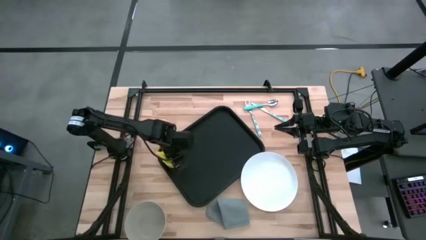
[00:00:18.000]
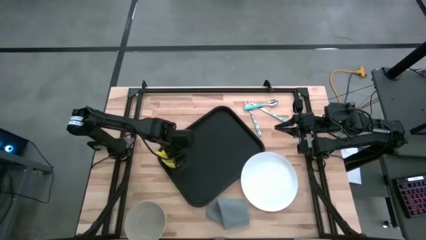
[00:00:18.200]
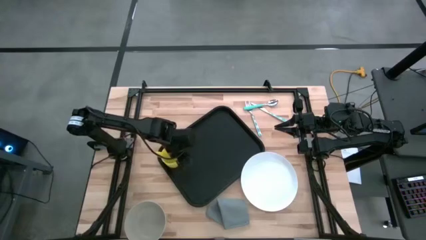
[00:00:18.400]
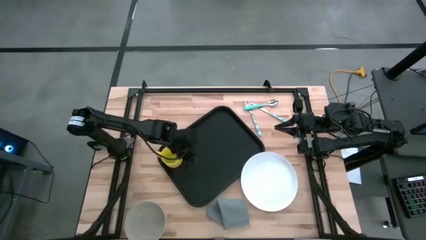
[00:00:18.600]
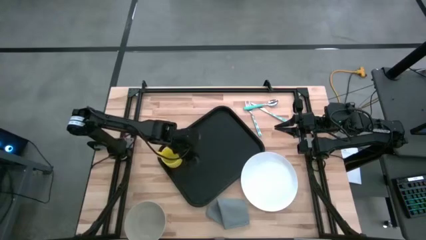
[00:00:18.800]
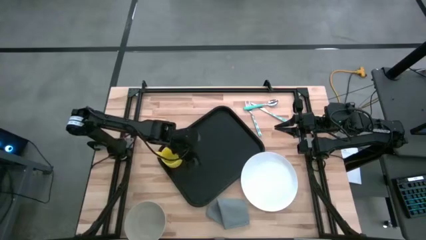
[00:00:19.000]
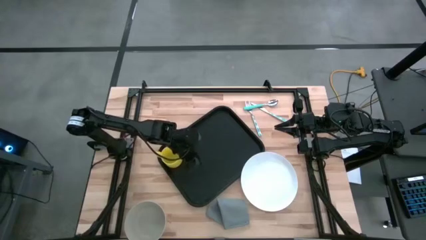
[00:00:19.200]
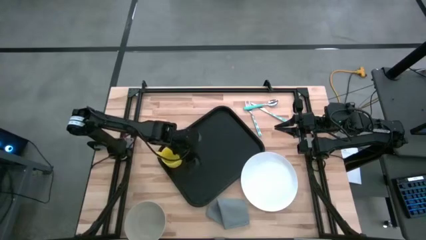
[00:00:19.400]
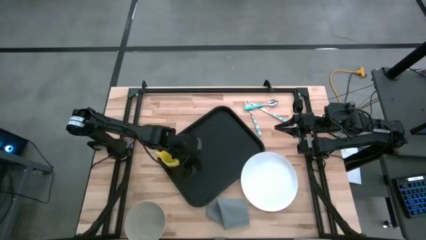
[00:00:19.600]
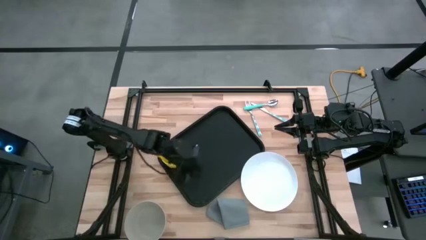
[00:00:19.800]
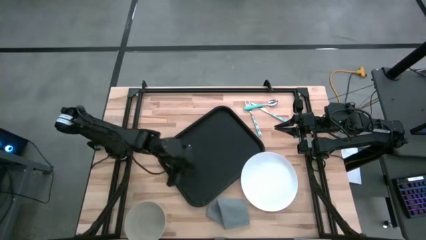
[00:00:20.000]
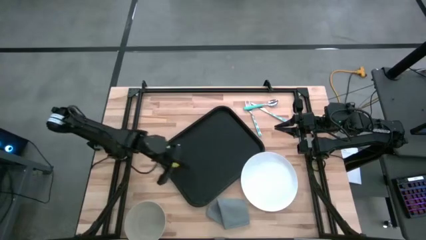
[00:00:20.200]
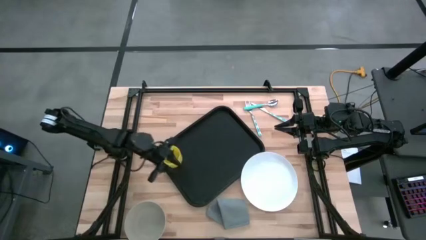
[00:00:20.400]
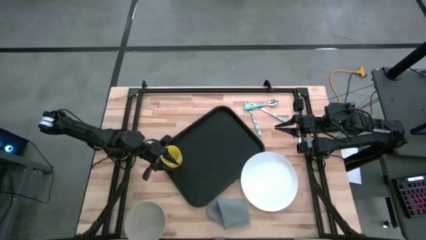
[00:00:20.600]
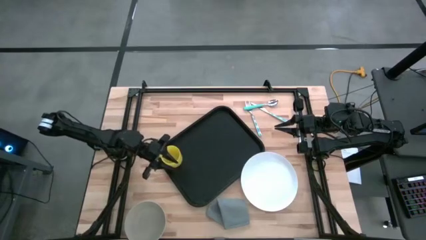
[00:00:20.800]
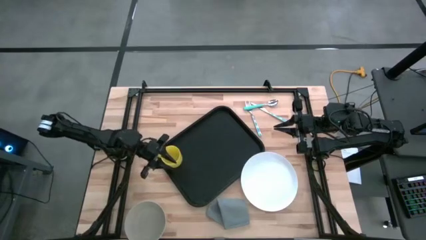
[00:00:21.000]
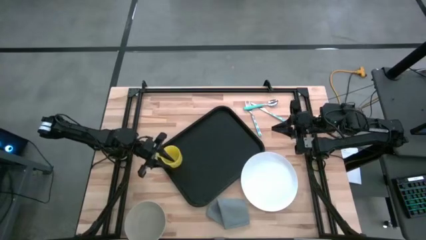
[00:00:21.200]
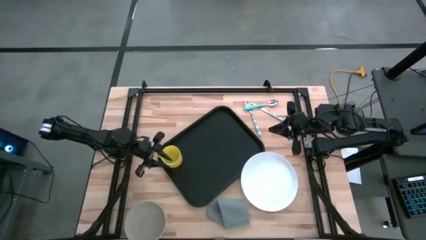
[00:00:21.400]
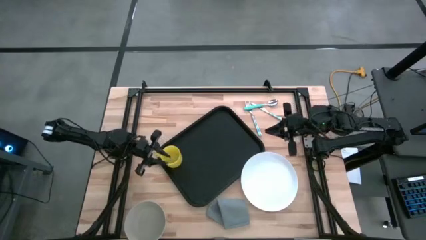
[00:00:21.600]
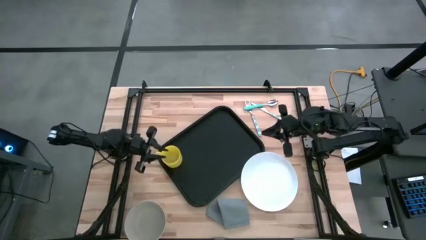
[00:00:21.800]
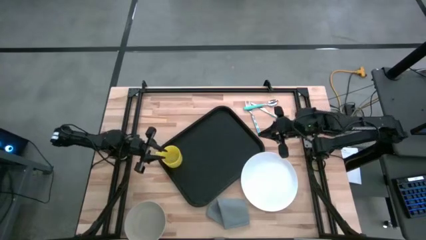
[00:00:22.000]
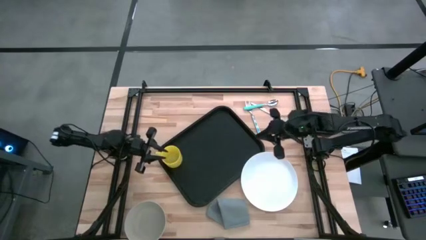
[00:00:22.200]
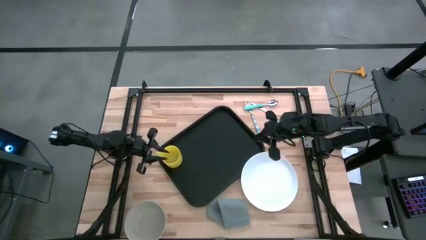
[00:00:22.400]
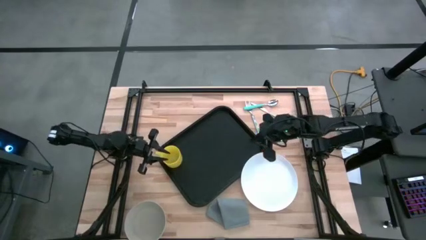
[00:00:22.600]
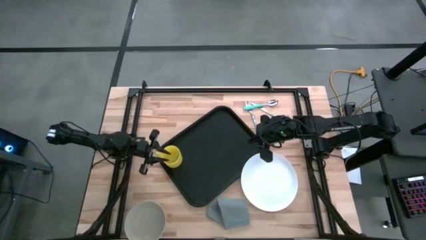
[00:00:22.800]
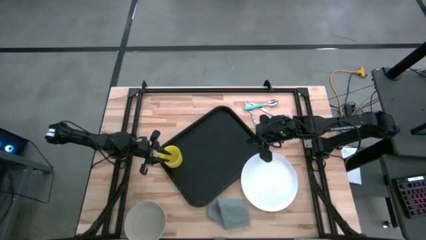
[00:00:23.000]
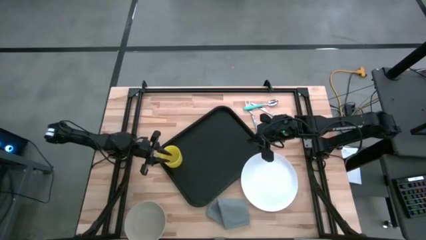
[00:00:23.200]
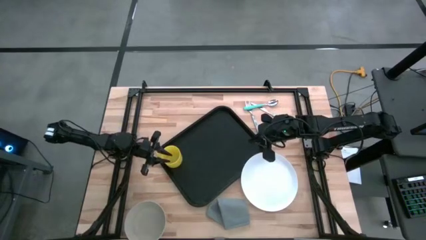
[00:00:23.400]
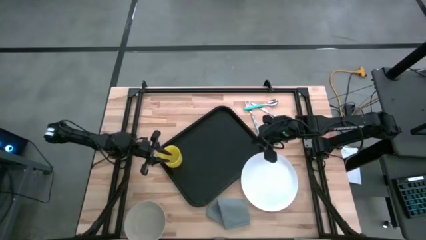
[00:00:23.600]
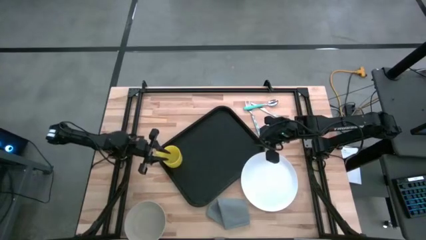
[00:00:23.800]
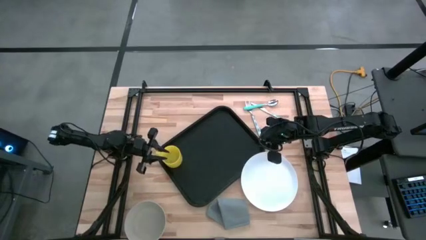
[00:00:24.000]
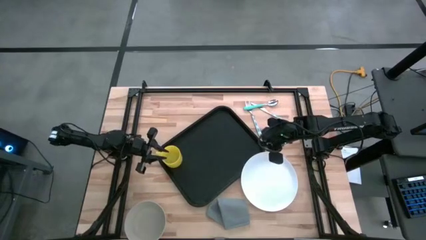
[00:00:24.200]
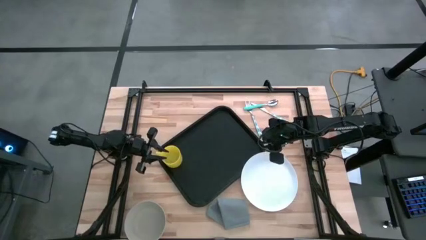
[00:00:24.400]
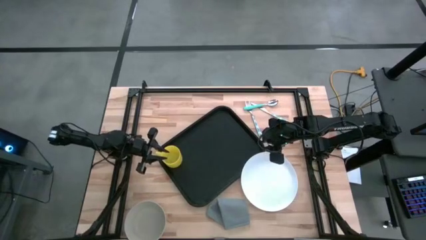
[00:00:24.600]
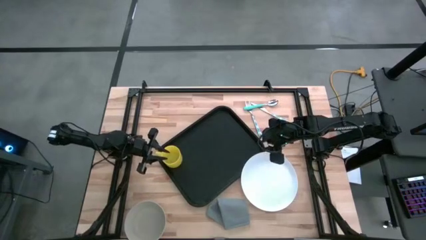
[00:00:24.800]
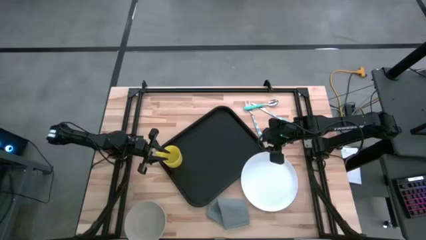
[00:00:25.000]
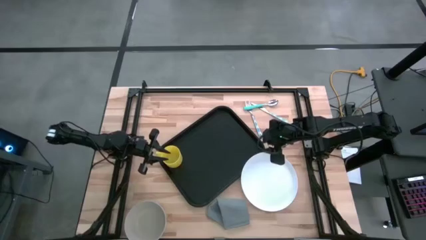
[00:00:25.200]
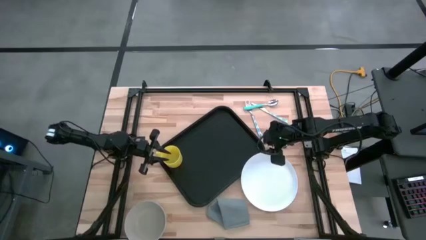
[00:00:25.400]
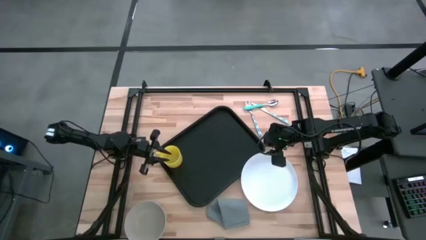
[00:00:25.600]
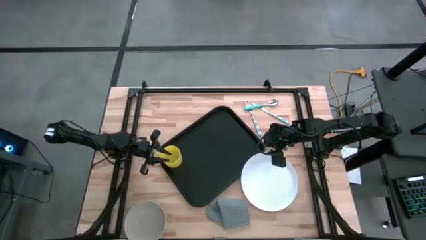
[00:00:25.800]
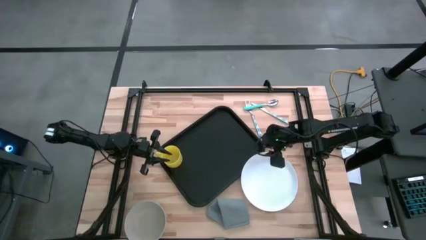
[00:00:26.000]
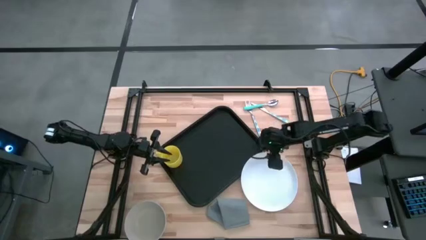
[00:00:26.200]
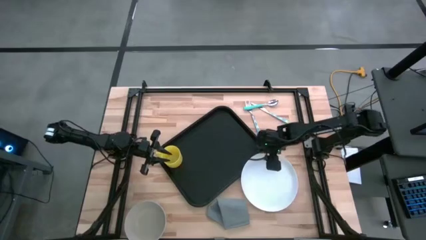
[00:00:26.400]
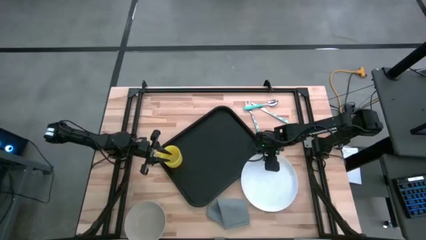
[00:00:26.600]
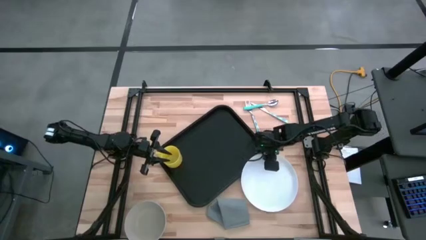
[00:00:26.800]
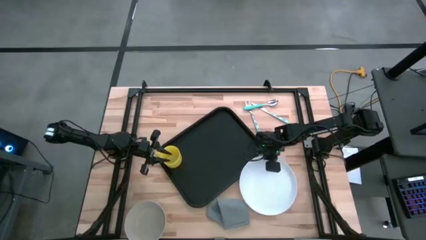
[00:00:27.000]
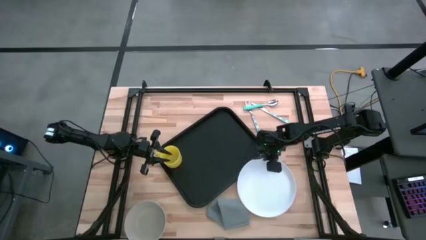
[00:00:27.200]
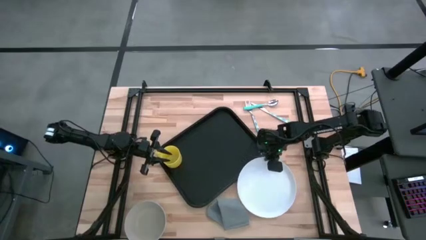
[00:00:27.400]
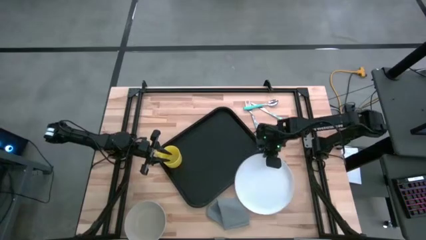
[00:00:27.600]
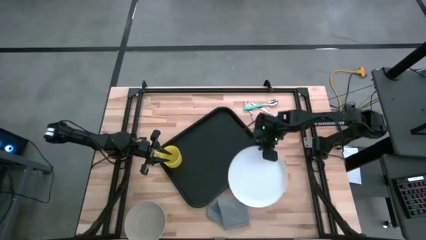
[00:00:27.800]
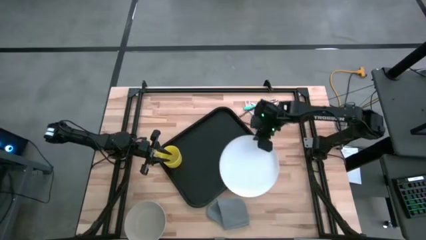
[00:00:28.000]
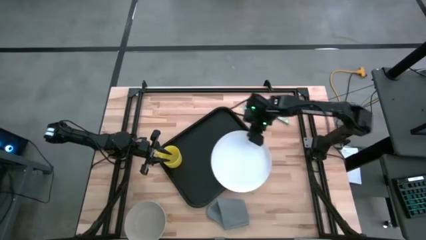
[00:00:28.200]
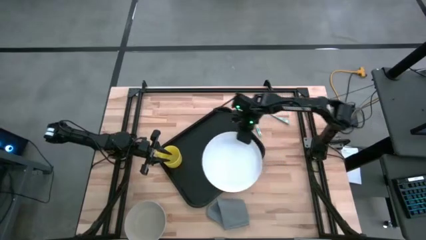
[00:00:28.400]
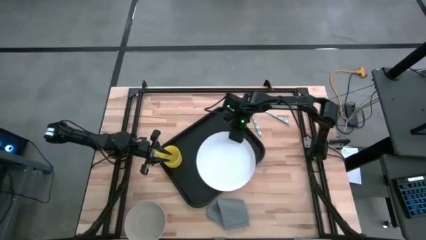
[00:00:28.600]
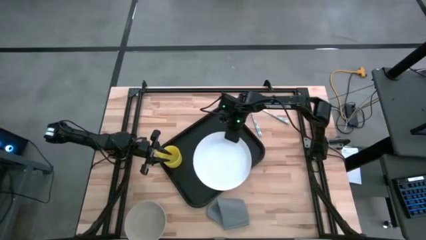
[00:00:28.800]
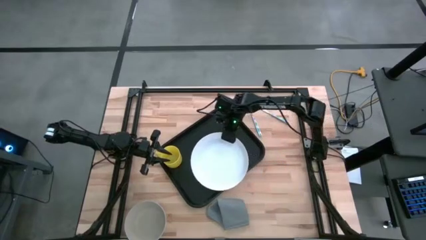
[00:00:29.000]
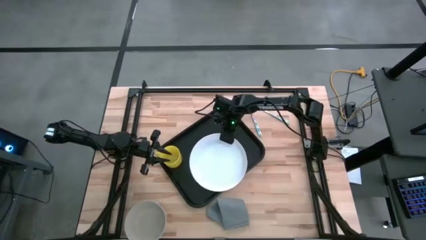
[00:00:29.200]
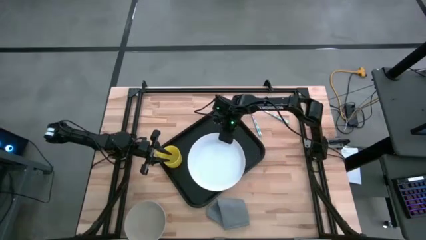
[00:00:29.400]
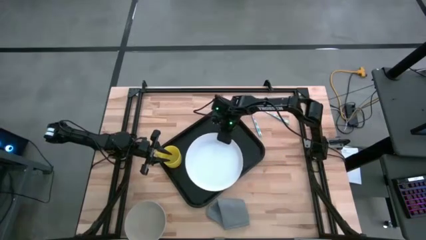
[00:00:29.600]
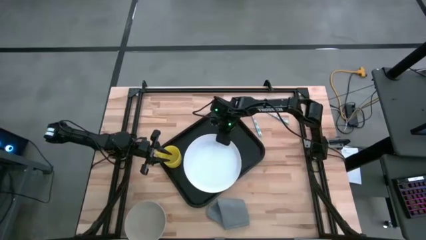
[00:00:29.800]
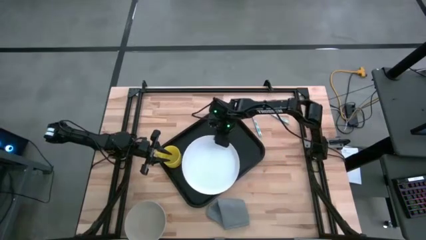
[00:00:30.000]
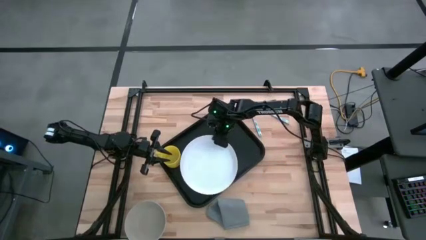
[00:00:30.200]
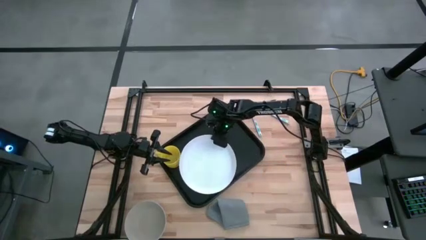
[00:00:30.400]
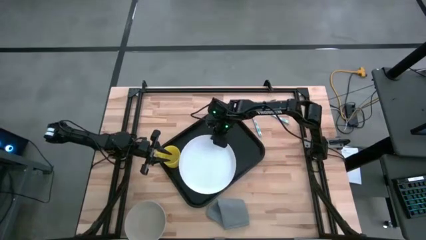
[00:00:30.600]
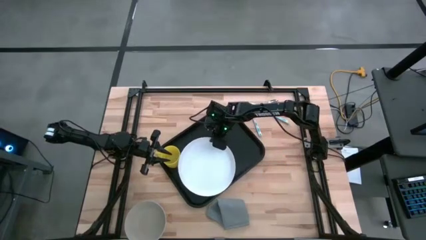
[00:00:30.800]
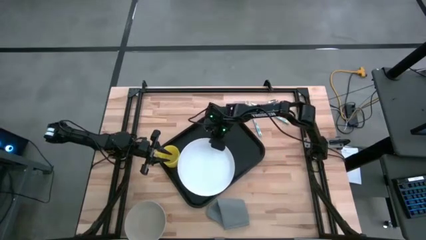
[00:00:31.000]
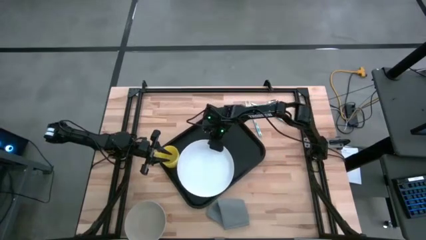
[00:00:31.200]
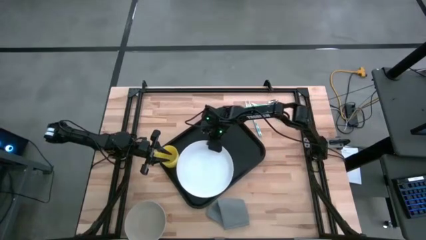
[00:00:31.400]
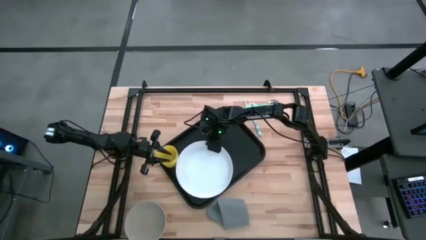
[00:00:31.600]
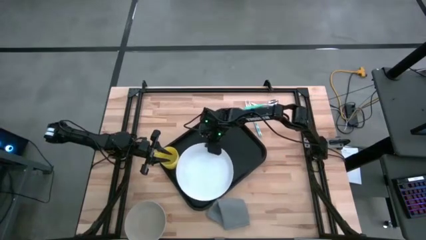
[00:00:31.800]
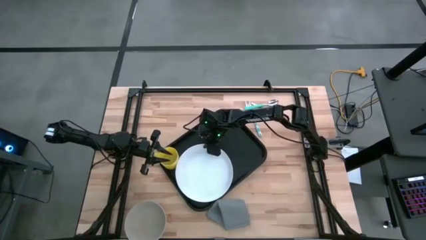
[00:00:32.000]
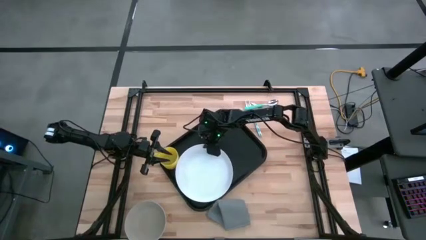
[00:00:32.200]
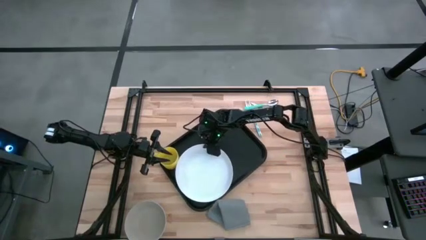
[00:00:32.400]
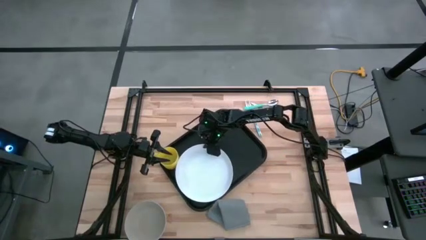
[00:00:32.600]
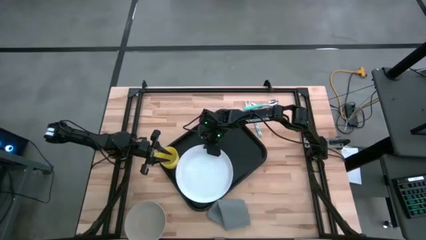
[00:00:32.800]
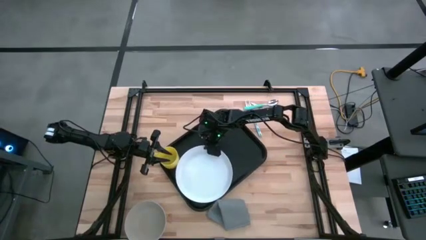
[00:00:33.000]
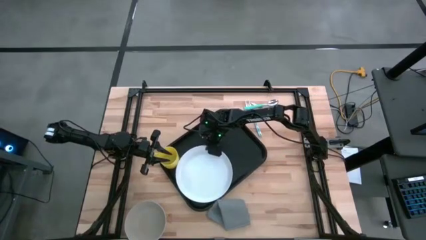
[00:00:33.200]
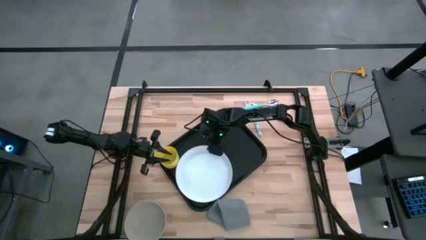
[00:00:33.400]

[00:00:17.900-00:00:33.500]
Task: Set up tray
Put the white plate on the black tray below the yellow mug
